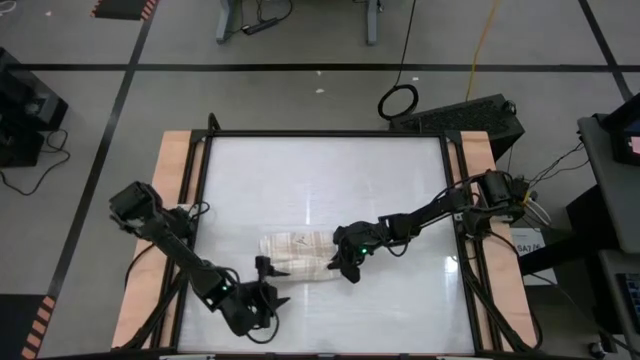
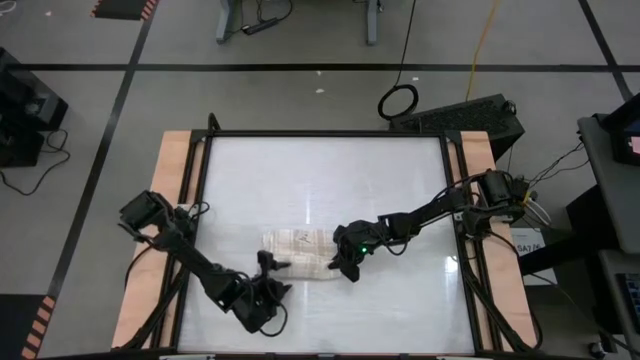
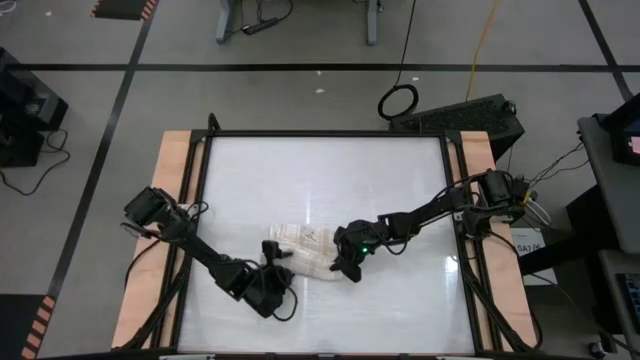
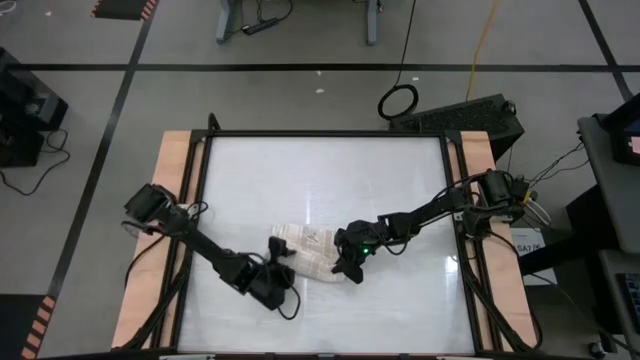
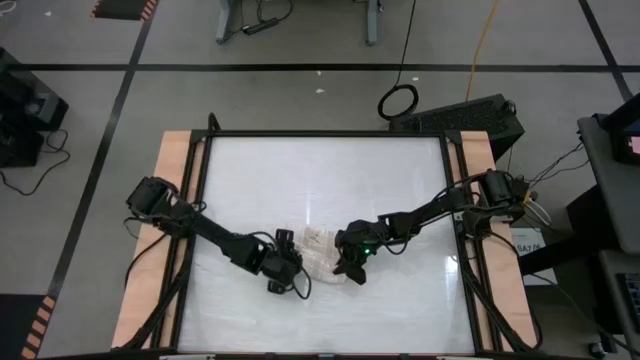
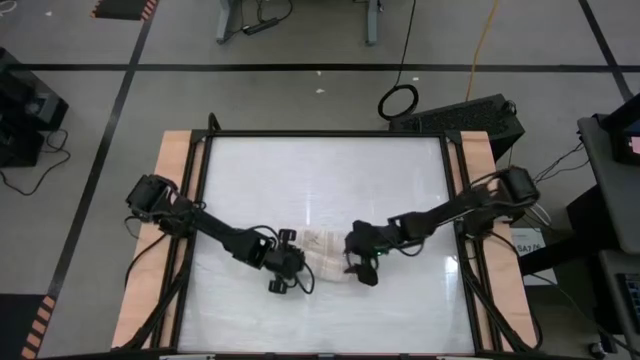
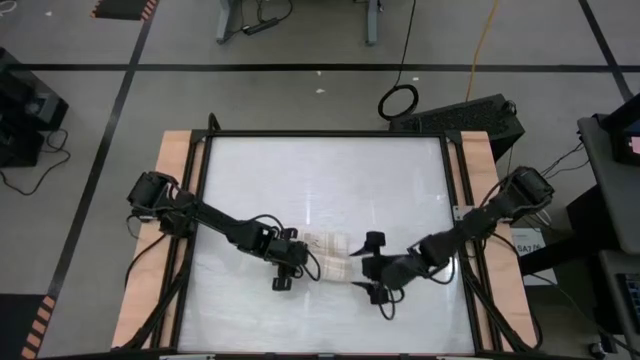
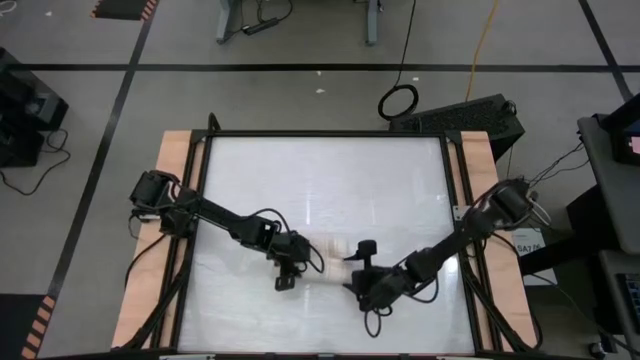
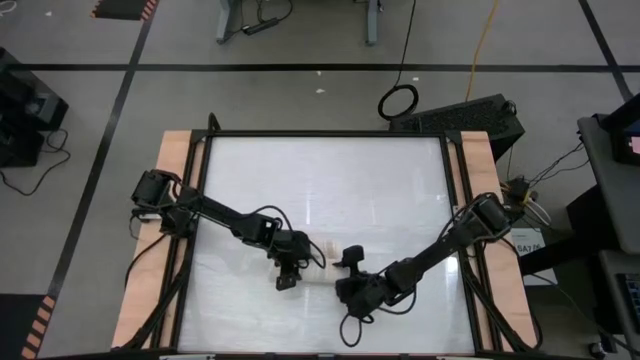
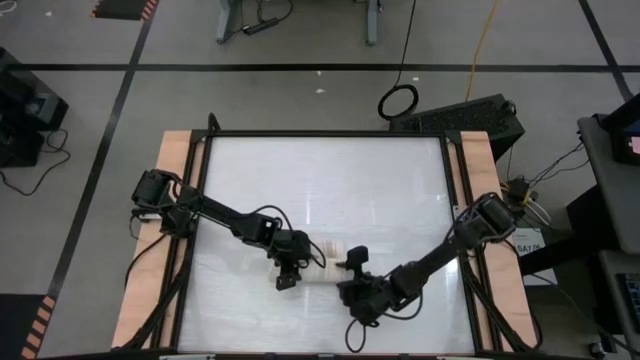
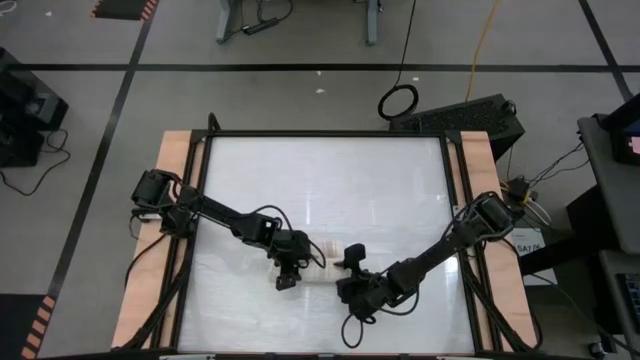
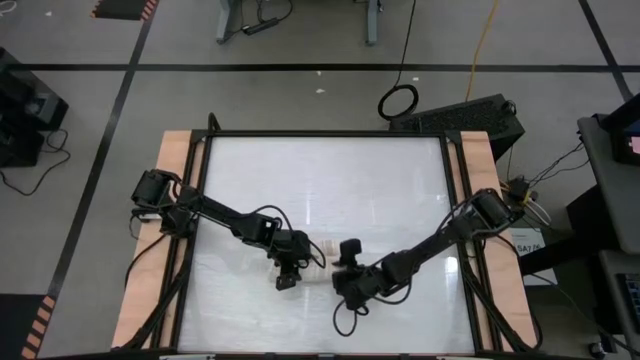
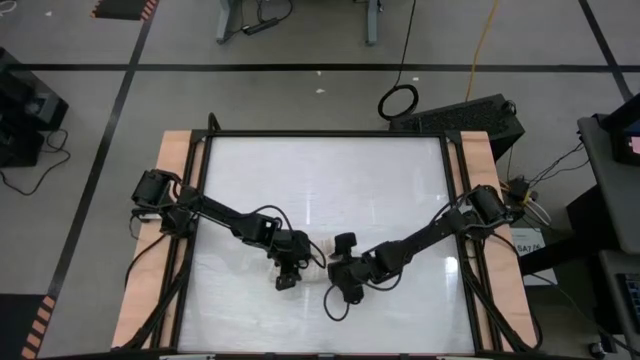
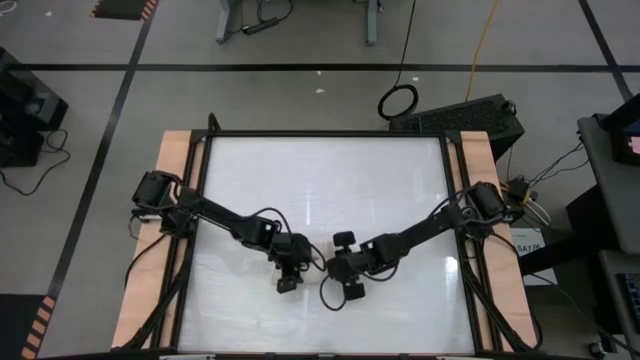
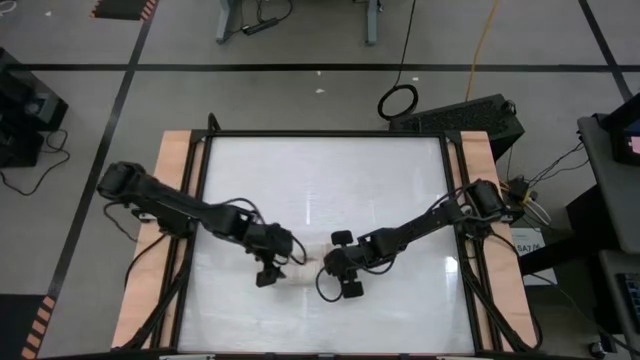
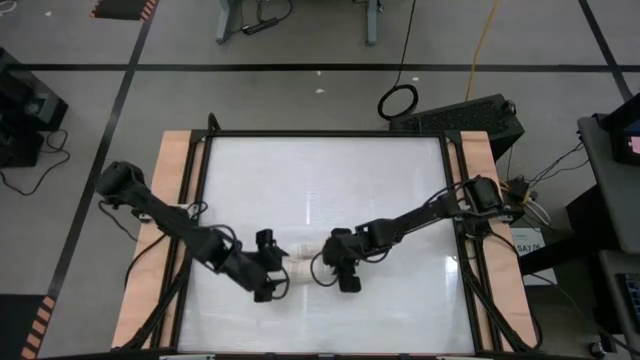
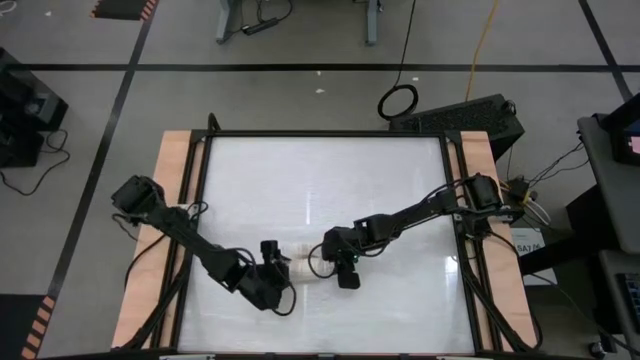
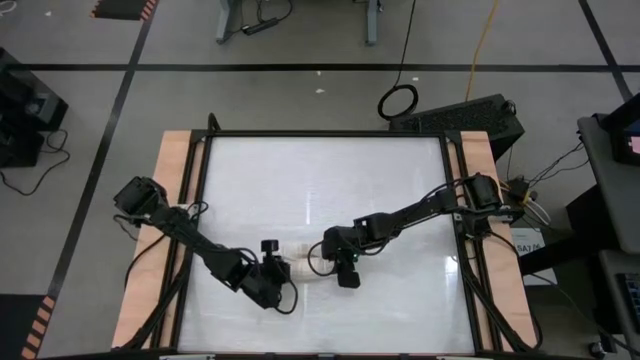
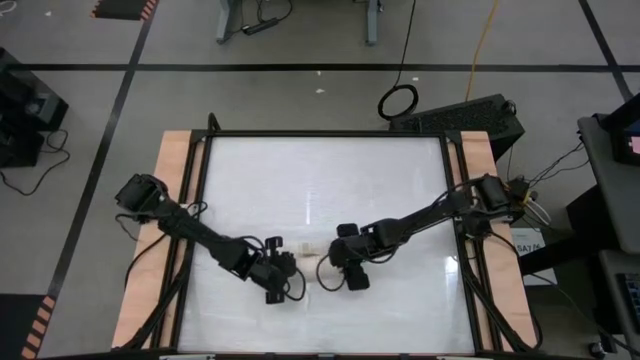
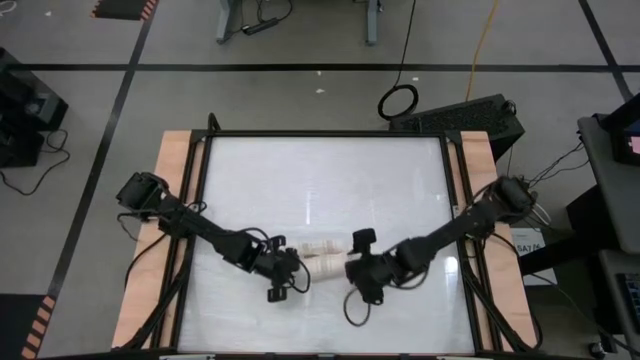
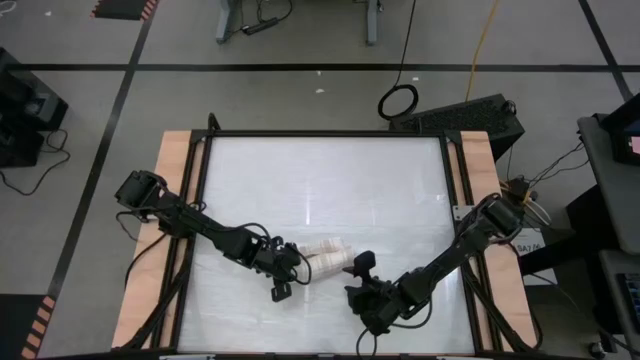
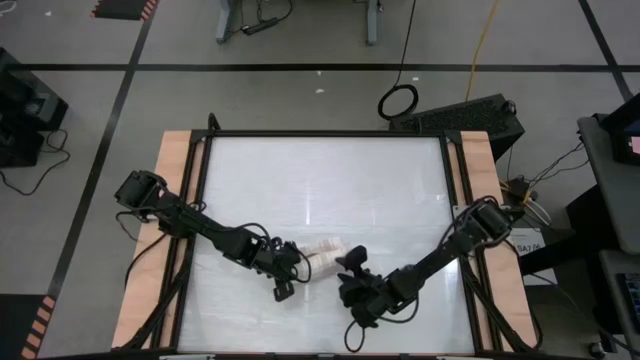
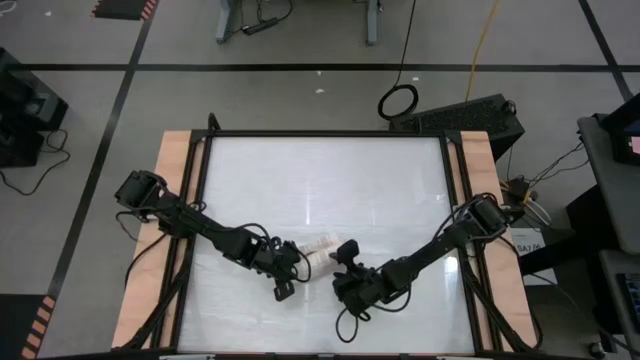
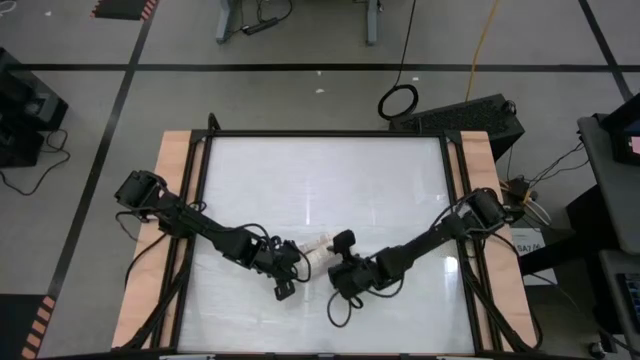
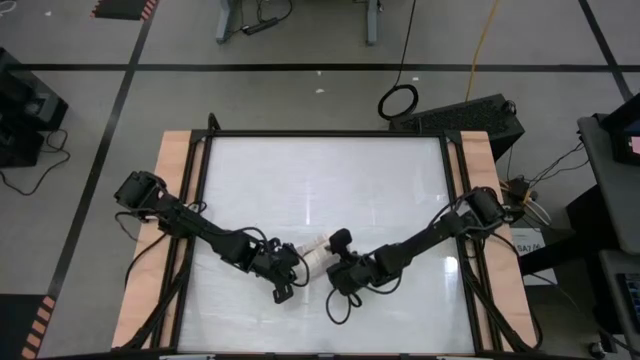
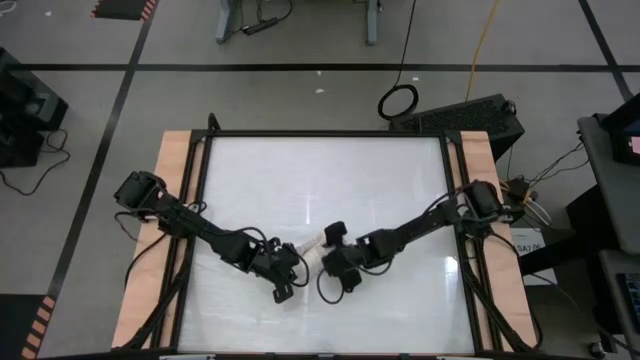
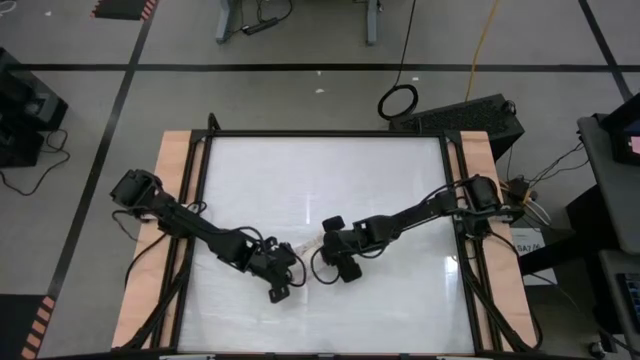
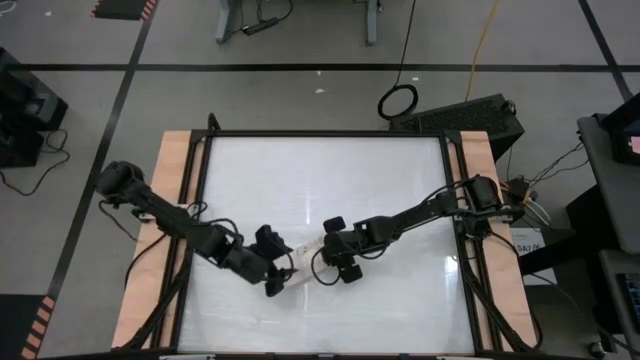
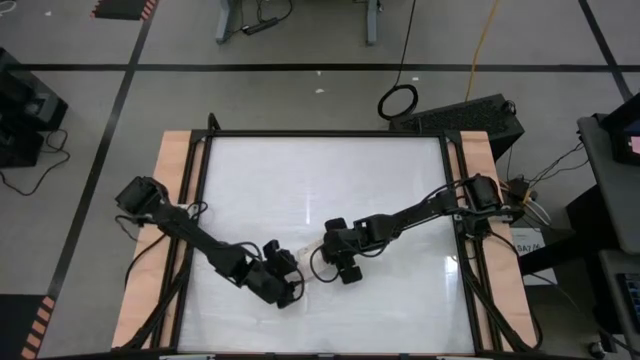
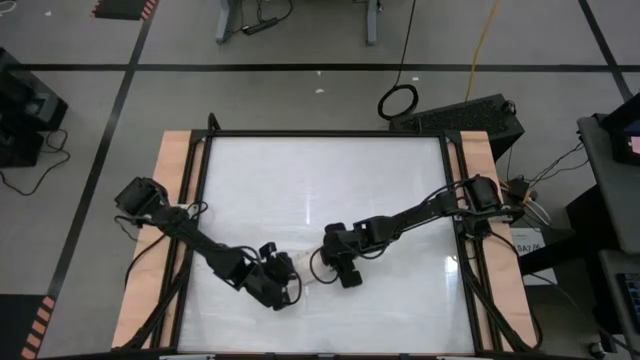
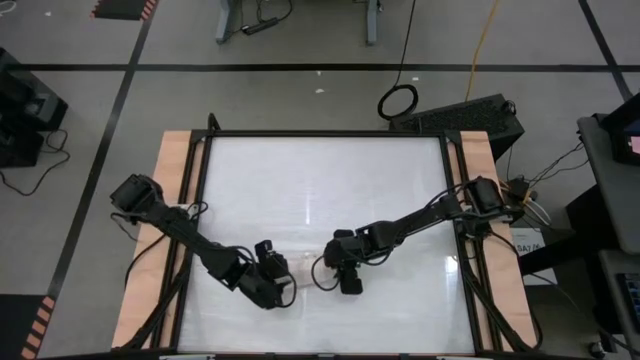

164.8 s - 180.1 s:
Task: Roll towel
Roll the white towel

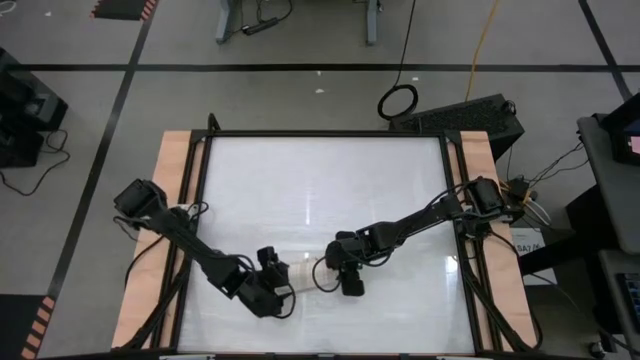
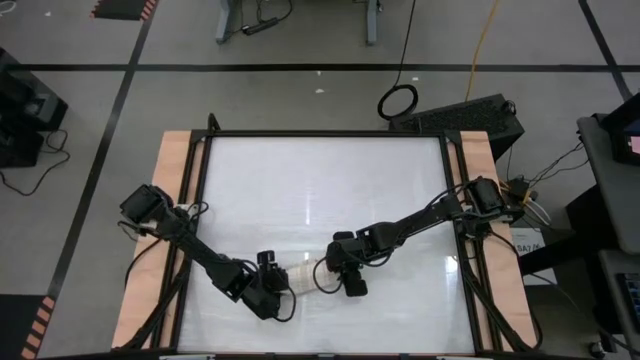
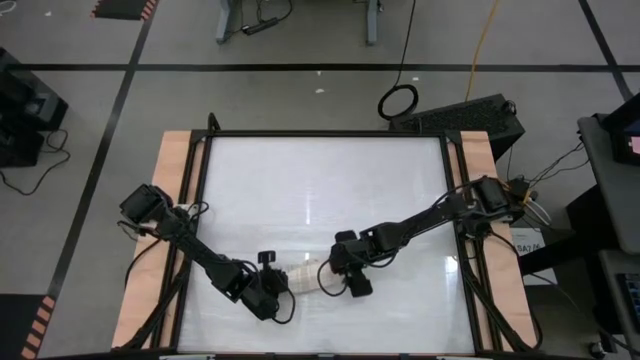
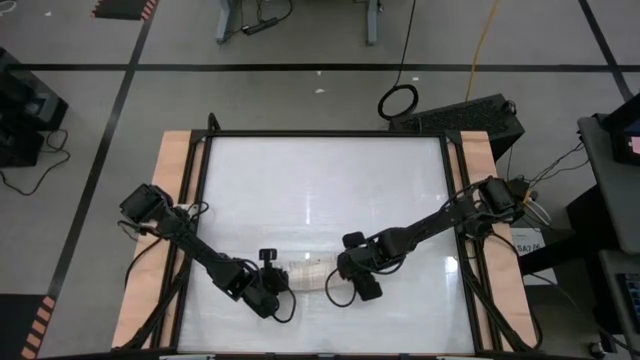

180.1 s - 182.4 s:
Roll the white towel

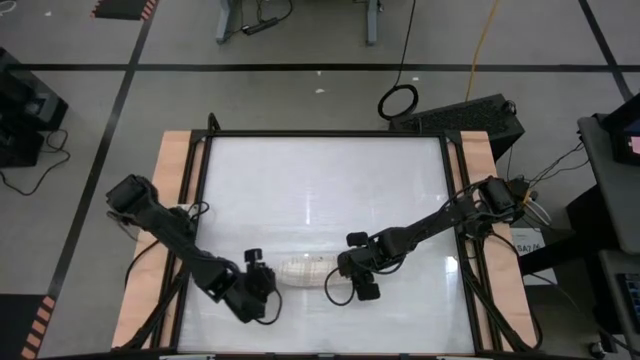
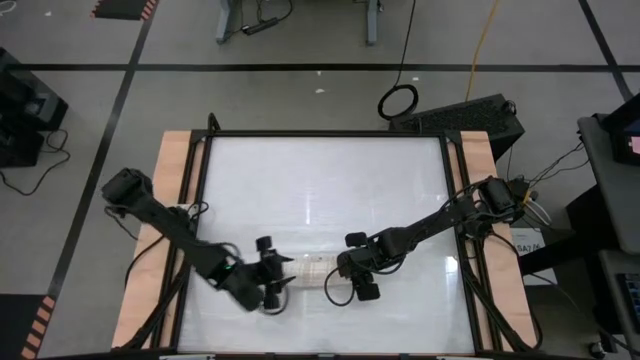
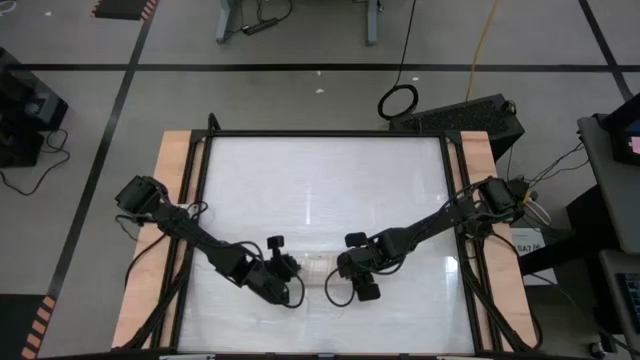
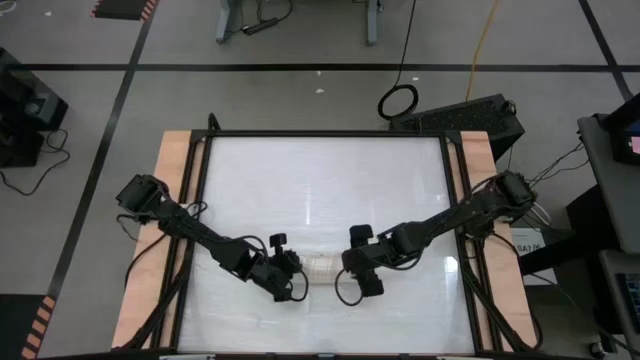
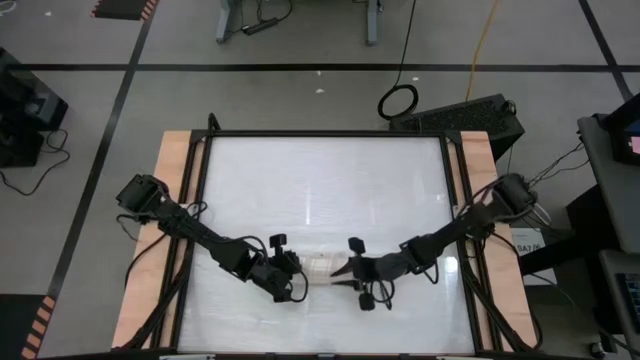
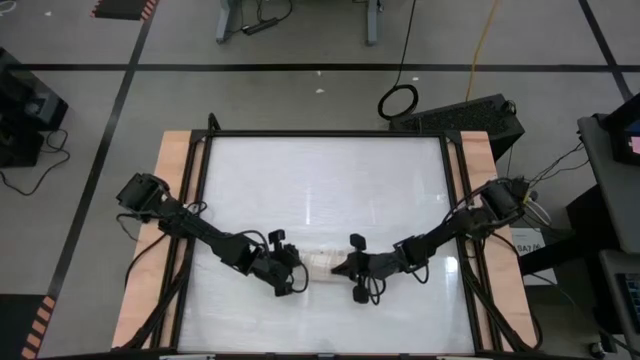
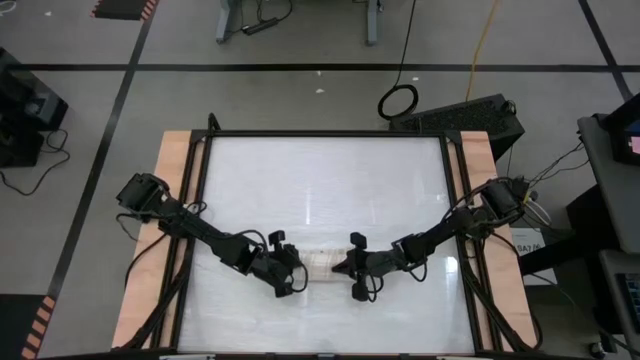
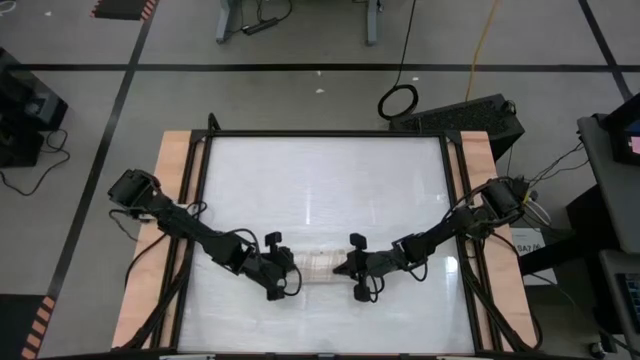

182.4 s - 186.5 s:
Roll the white towel
